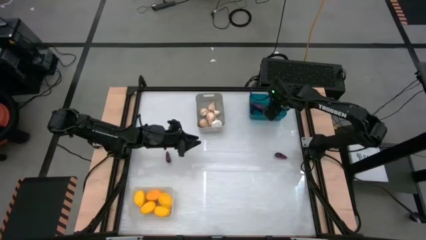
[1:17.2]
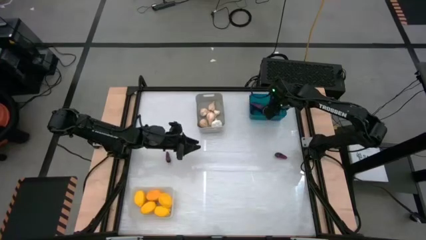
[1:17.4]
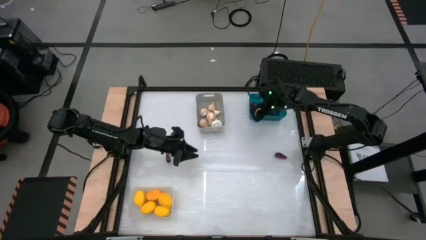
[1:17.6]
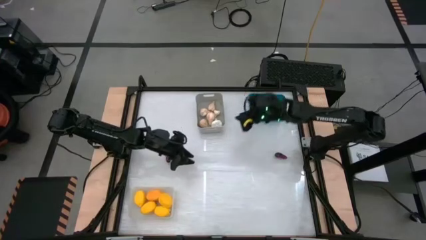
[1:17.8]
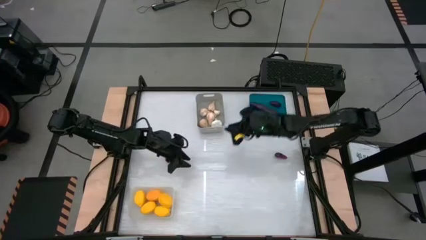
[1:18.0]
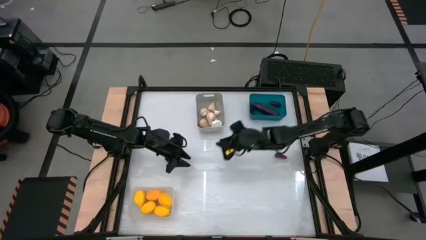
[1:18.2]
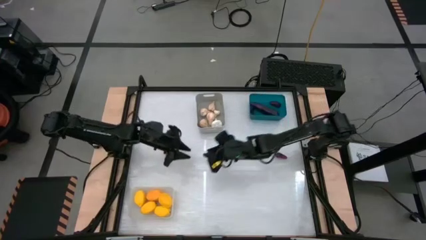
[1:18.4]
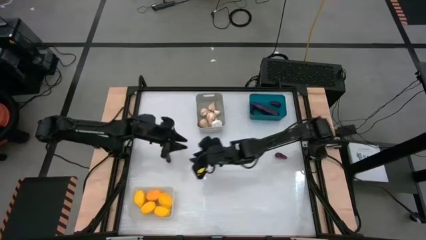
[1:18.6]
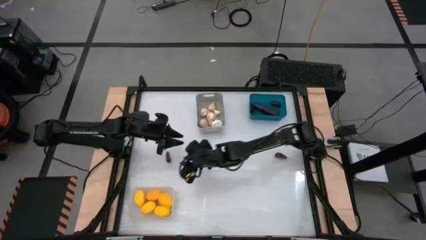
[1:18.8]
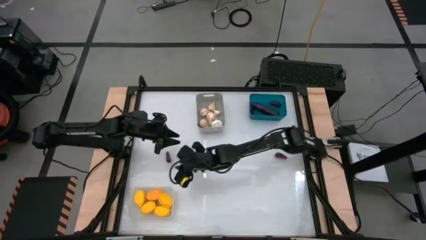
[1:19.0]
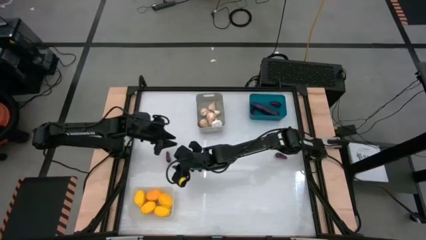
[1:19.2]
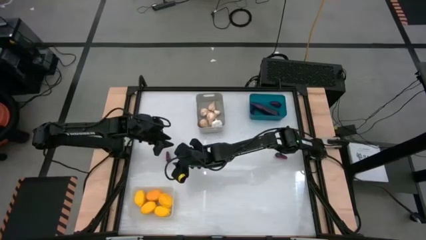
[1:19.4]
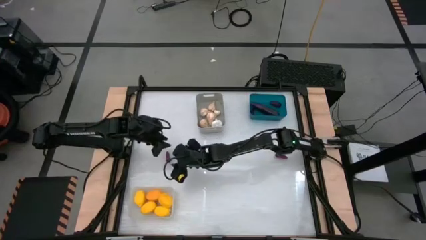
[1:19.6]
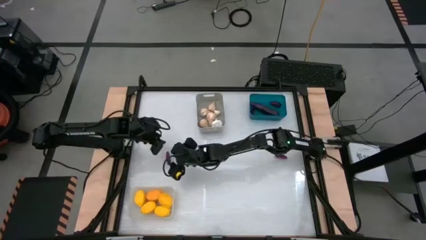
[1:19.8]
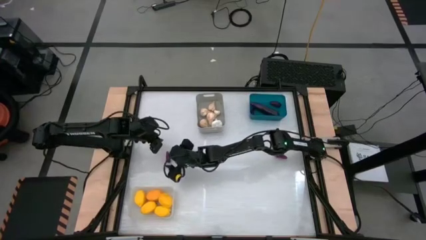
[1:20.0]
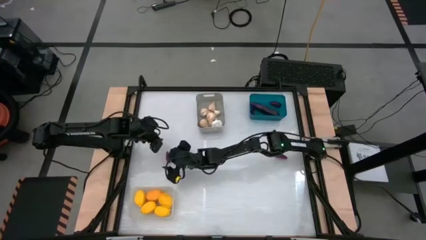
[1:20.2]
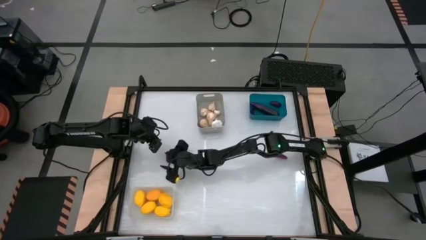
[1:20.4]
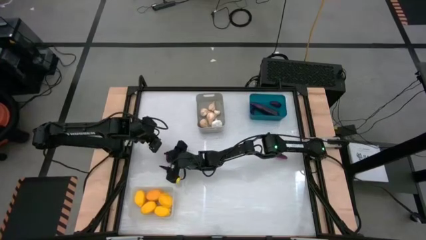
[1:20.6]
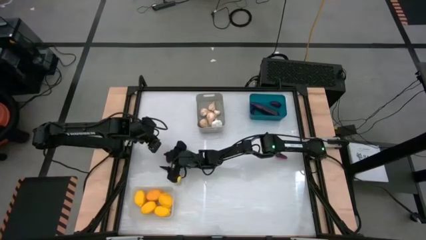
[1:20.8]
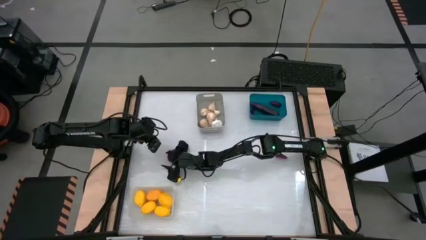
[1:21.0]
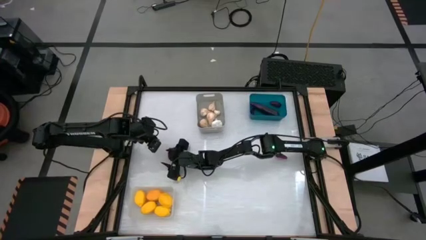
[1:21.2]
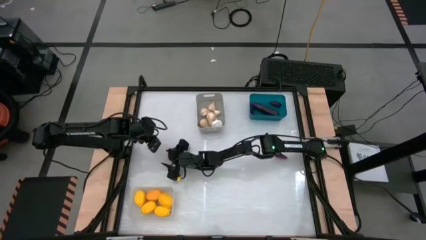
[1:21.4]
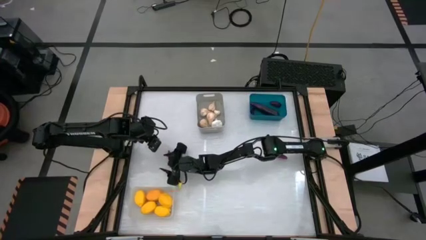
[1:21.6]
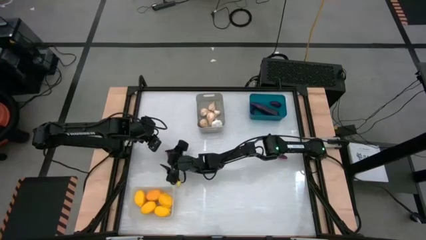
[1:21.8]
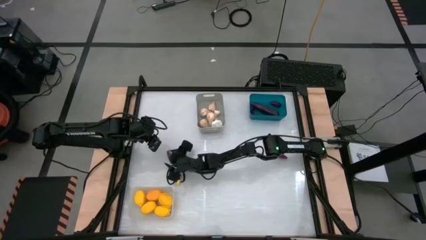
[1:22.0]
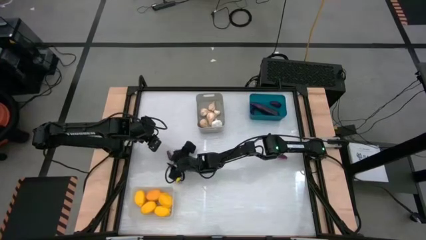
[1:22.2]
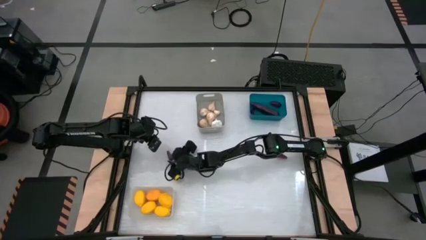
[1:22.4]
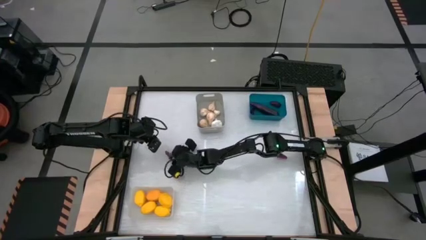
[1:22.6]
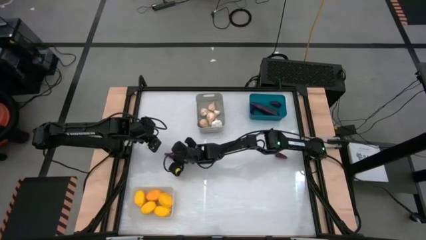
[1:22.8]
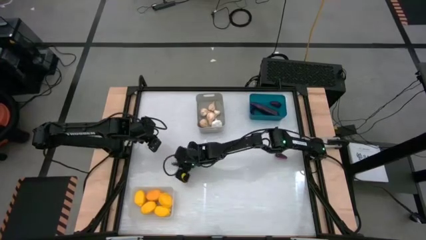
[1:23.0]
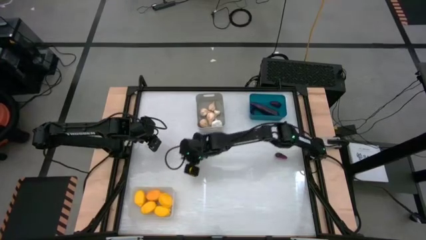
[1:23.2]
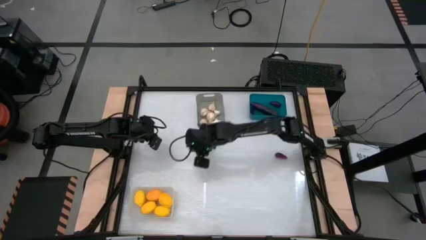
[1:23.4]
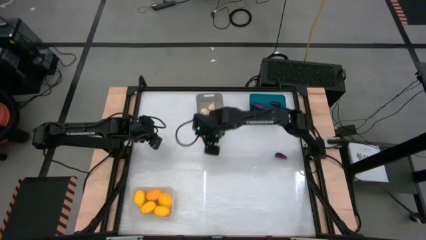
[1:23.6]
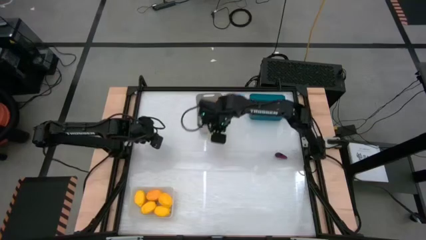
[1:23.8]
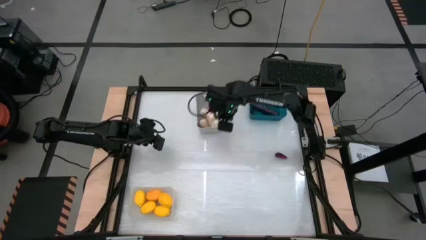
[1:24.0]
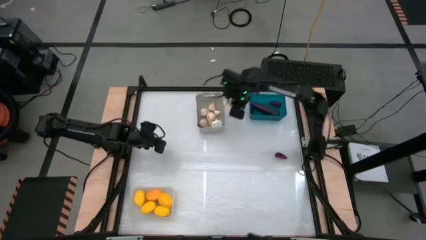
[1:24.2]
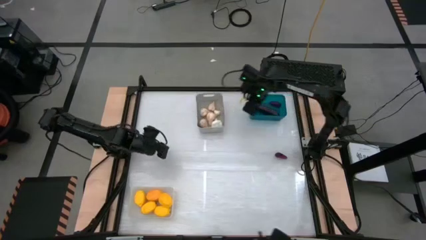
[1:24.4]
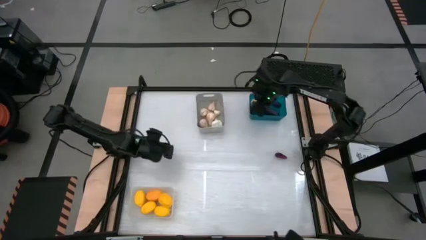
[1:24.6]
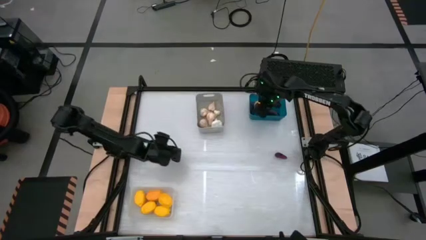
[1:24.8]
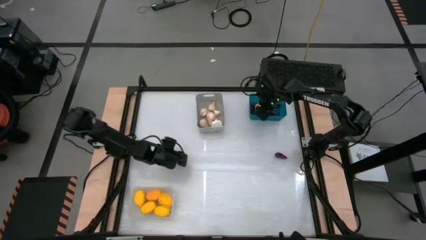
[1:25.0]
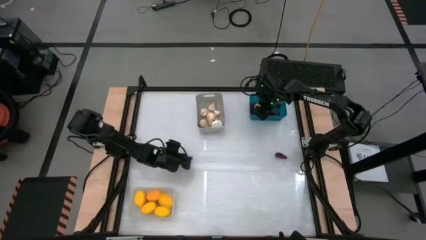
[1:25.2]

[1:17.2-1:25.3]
Task: Sort produce into baskets
Put the egg plant into the blue bin

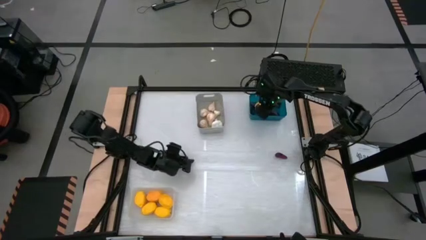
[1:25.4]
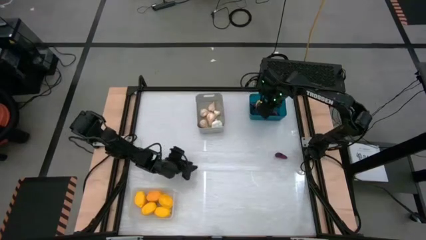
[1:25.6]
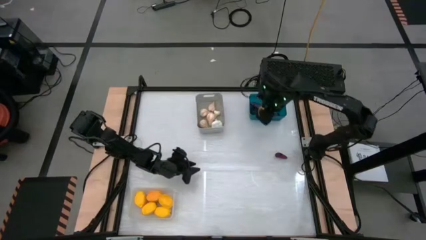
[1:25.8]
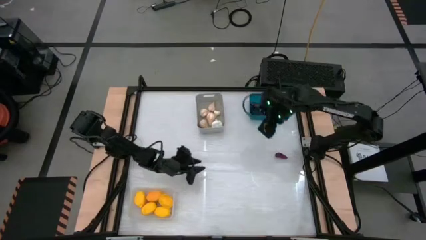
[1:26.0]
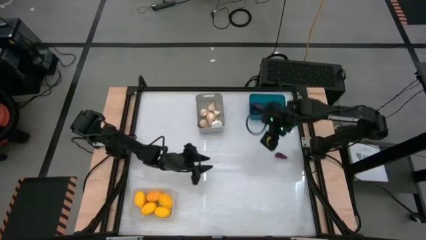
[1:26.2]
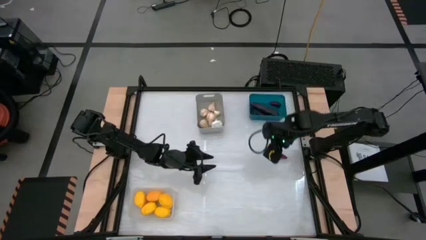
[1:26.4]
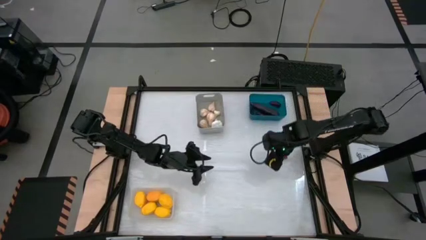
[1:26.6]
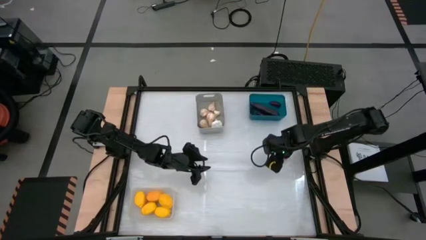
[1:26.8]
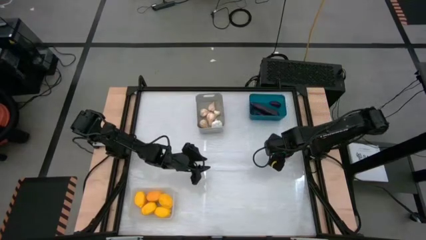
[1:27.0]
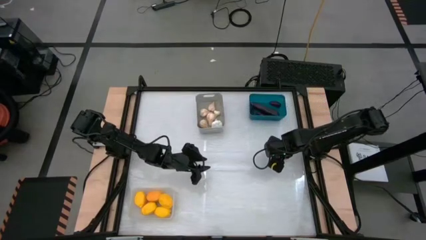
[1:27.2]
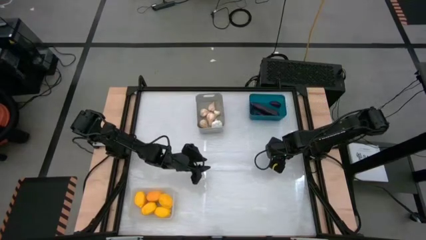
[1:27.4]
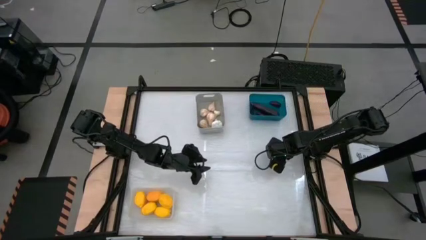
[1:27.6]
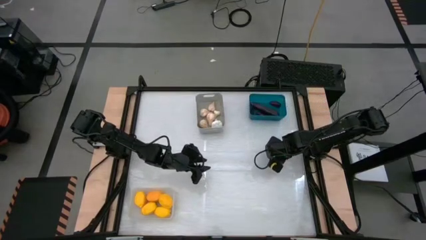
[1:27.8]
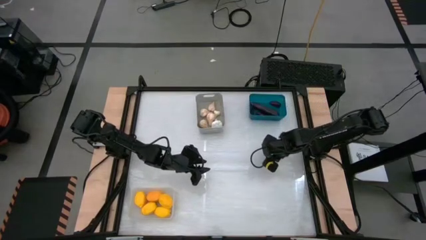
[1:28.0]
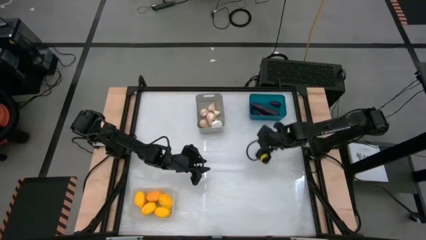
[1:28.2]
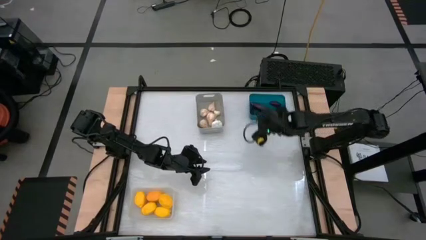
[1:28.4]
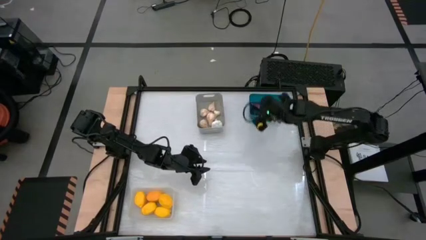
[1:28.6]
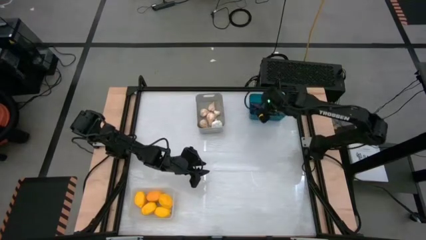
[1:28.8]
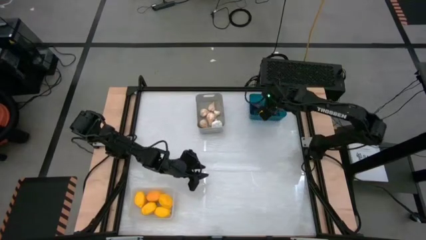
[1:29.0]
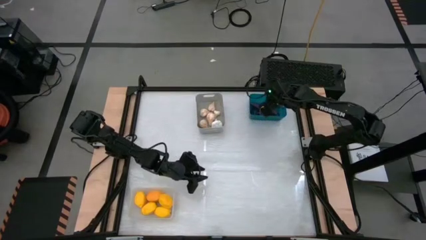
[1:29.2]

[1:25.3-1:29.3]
Put the egg plant into the blue bin

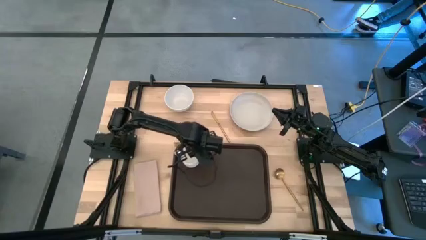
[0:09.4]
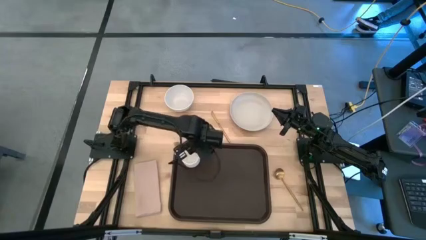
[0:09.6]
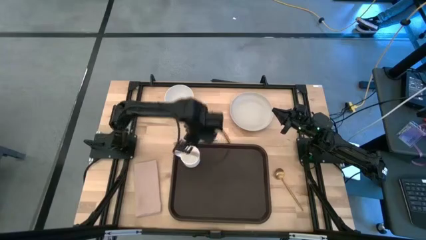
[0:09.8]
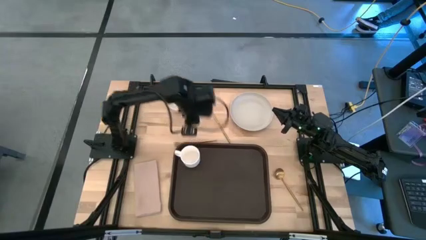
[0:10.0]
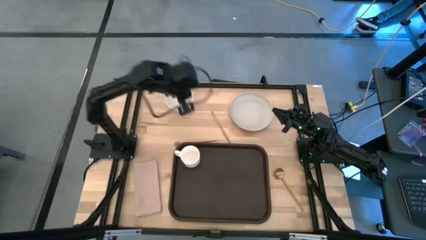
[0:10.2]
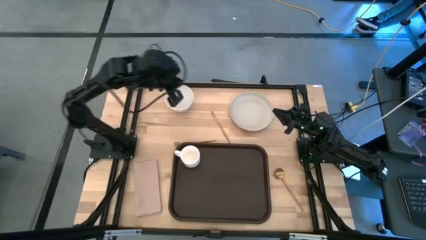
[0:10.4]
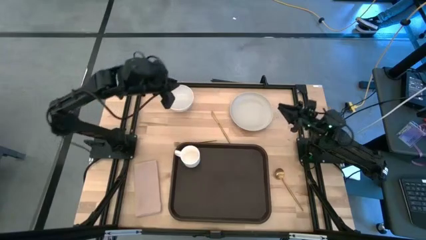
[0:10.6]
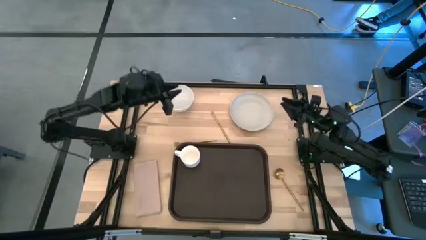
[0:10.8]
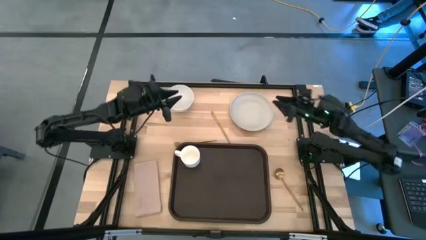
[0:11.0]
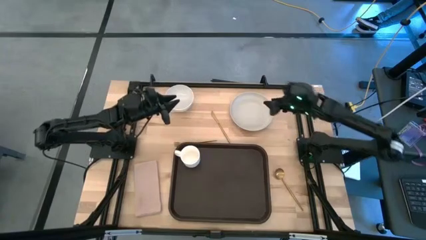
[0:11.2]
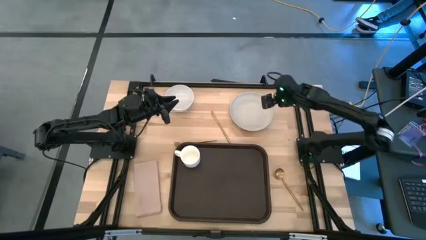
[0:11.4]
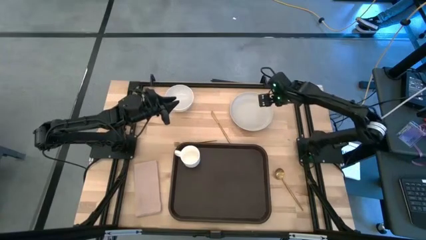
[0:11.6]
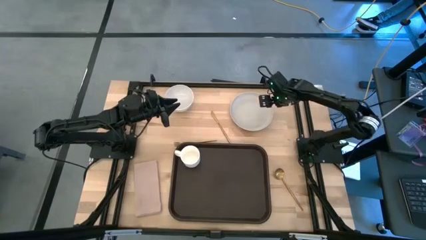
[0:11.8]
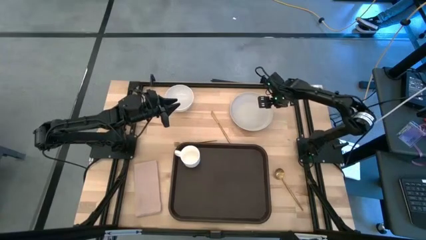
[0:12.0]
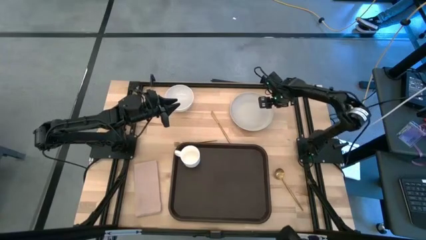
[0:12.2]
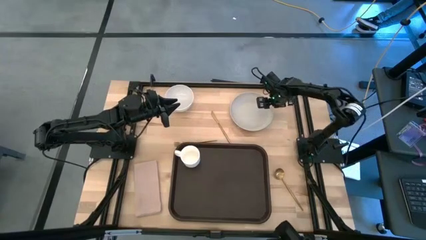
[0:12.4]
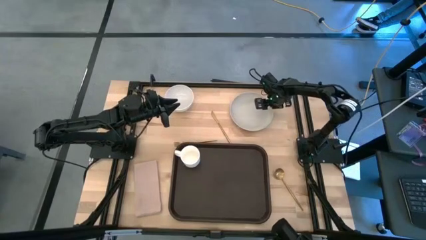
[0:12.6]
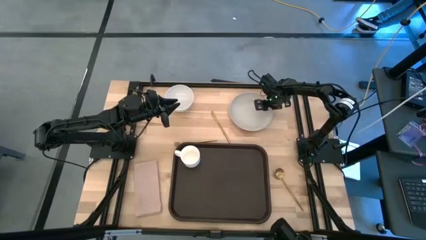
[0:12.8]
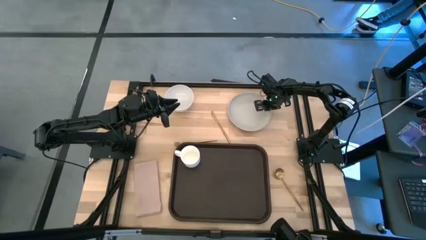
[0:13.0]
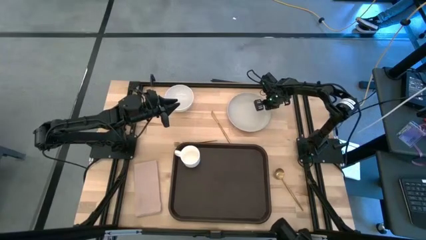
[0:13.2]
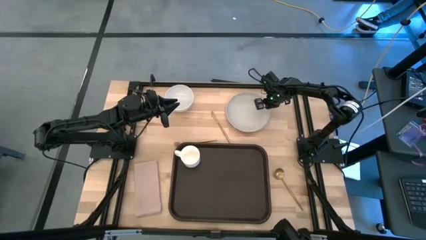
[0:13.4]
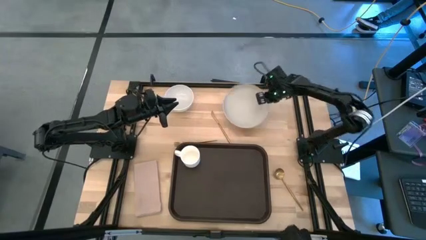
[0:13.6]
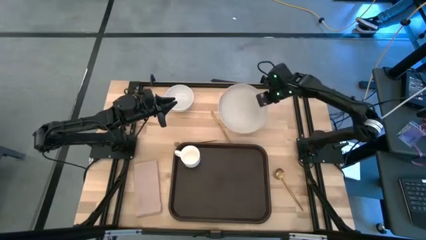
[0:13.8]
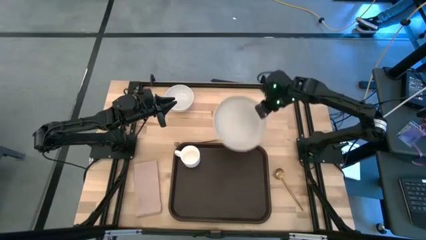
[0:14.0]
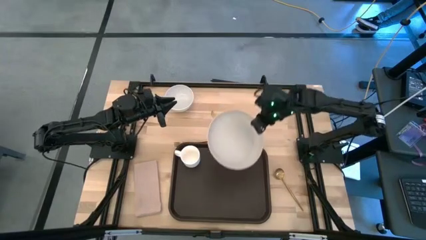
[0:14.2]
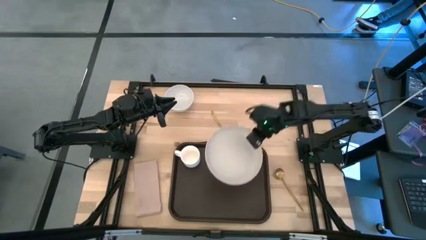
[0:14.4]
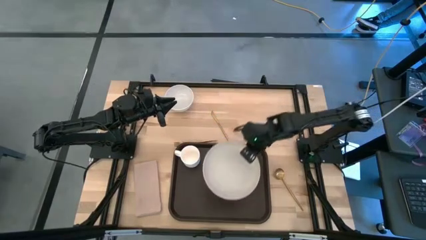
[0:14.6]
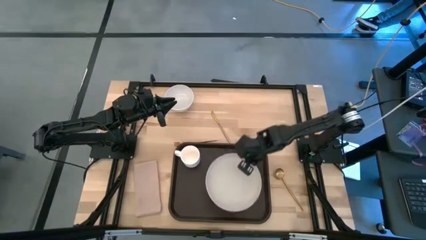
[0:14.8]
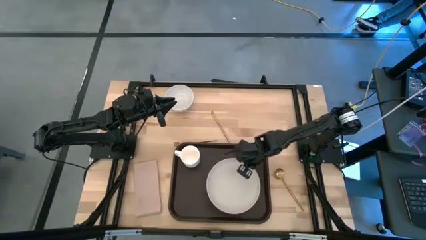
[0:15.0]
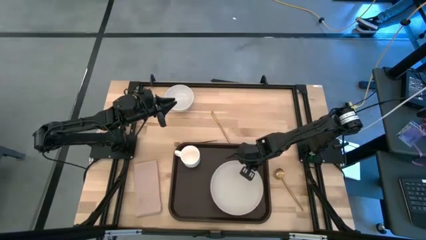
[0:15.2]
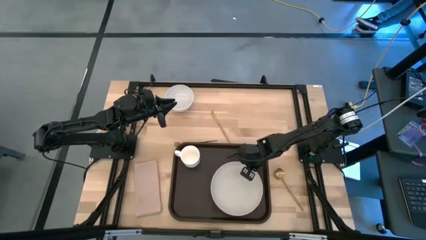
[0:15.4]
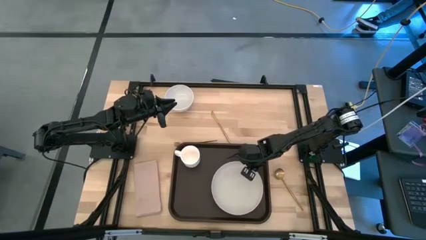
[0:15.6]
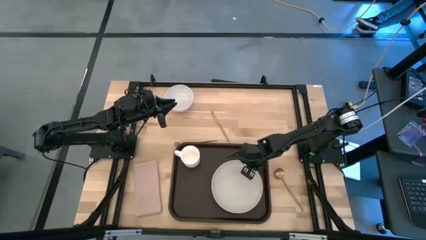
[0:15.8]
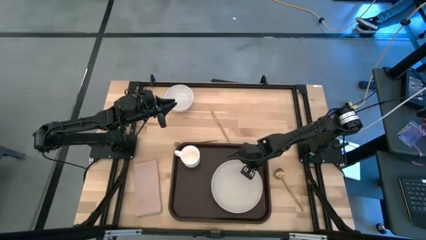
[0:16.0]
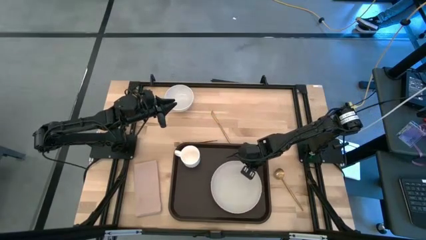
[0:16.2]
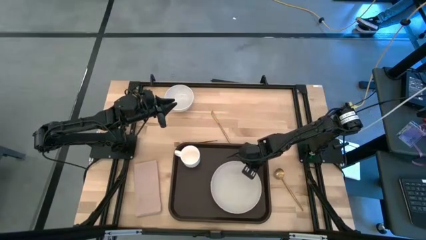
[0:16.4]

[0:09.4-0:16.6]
Task: Set up tray
Put the white plate on the black serving tray to the bottom right of the white mug
